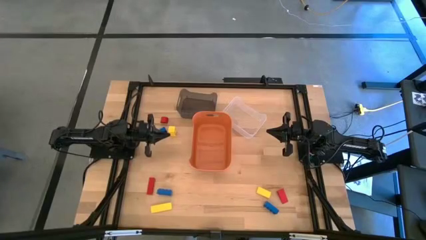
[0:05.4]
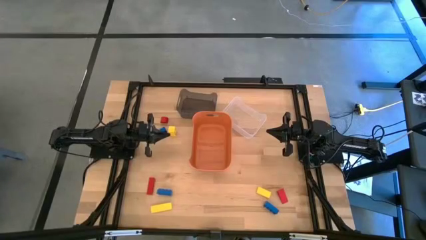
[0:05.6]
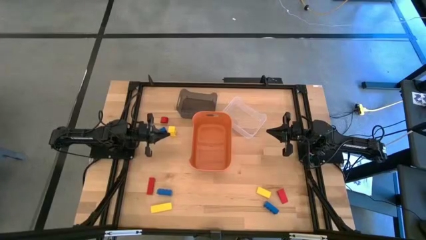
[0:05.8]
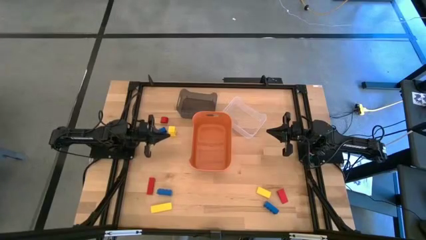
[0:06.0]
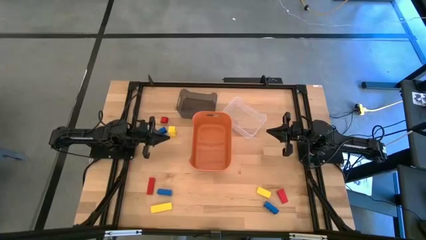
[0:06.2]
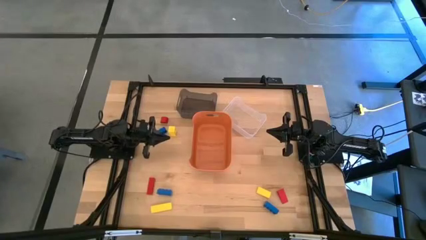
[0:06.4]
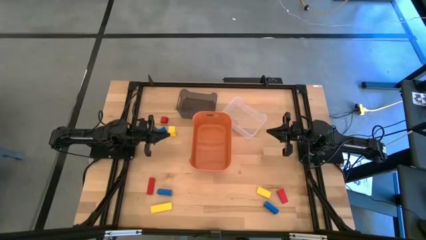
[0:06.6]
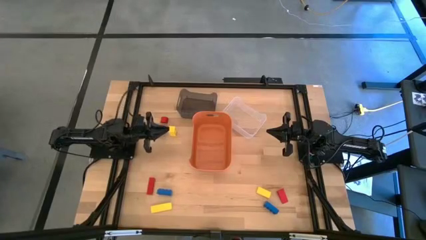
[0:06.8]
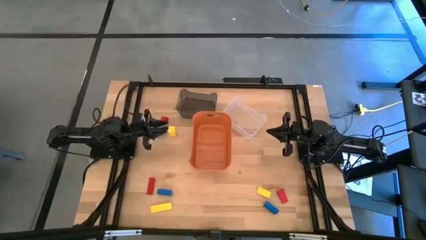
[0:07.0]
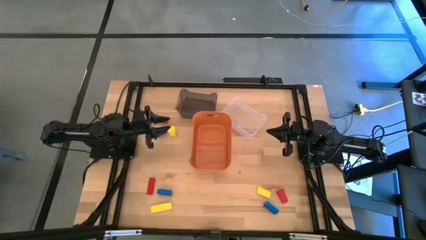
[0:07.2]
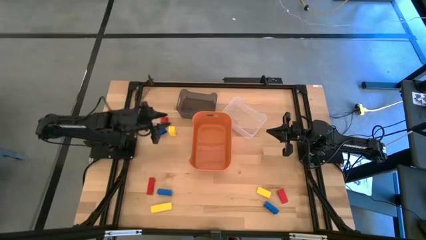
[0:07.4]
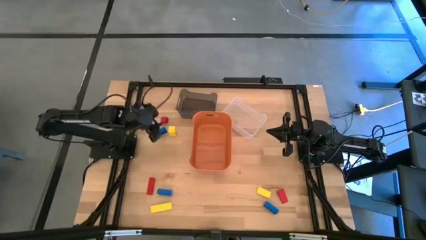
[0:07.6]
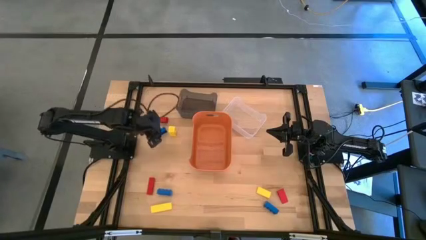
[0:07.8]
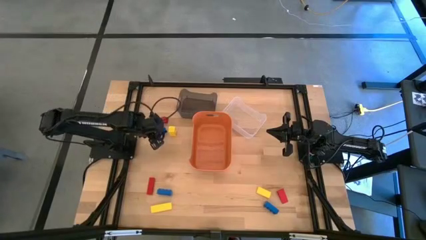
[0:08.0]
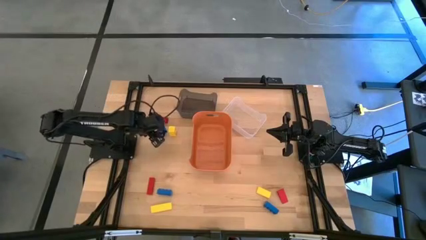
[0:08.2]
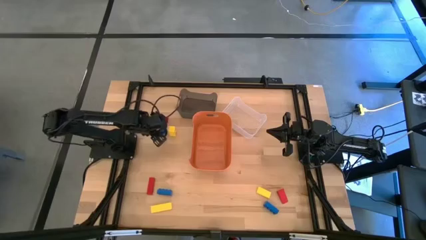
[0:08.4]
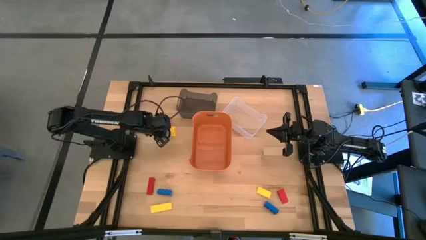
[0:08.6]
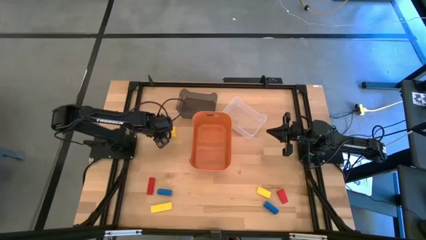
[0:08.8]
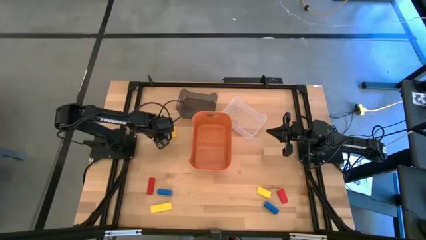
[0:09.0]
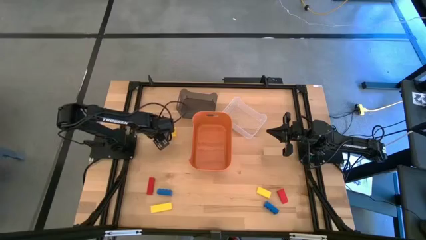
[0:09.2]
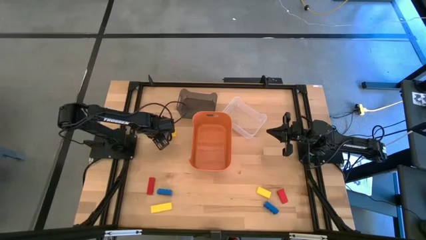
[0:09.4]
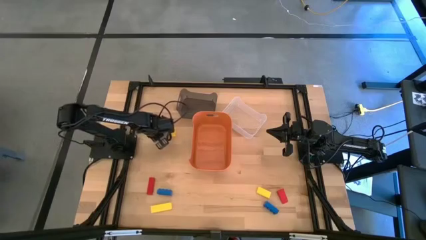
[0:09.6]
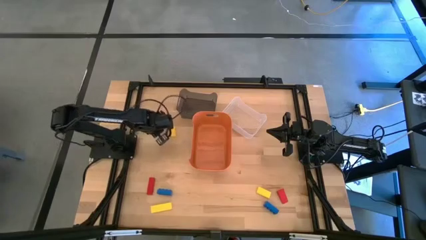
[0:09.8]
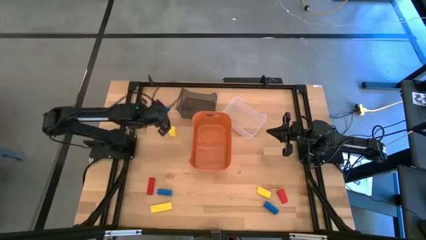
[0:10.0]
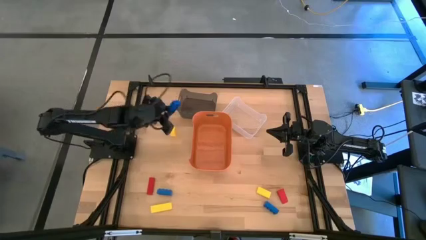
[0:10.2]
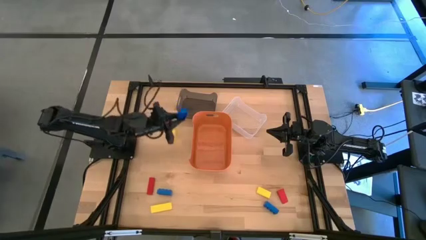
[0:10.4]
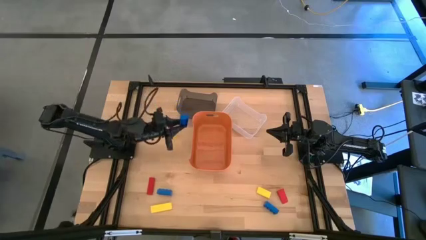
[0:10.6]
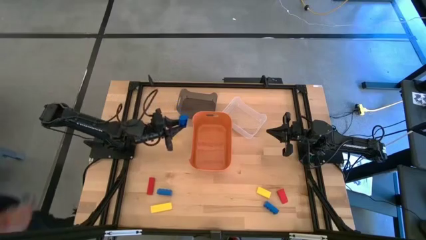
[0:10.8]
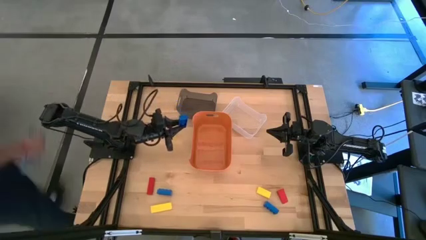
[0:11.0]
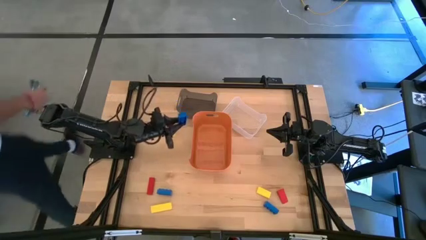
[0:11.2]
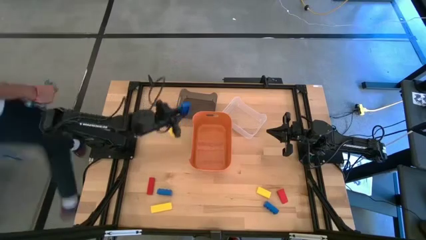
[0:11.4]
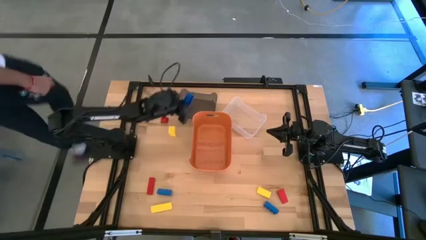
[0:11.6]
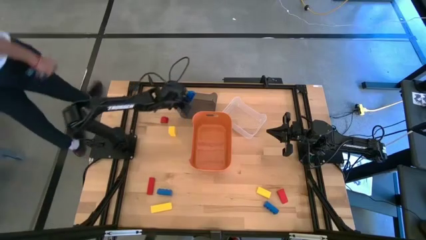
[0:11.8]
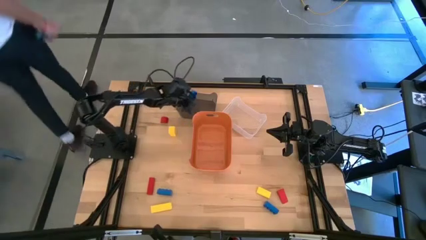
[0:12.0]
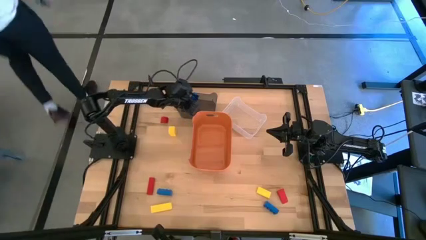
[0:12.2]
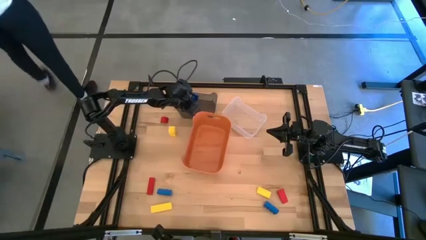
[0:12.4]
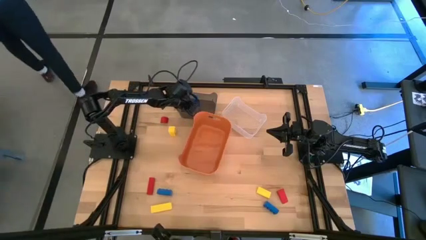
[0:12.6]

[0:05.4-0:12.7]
Task: Sort & place blocks by color
Put the top blue game piece into the black bin

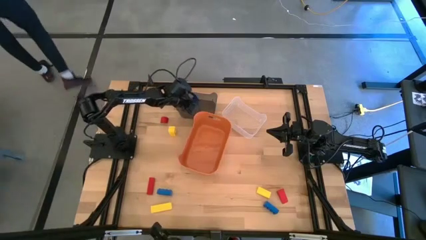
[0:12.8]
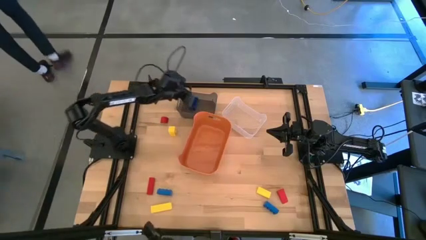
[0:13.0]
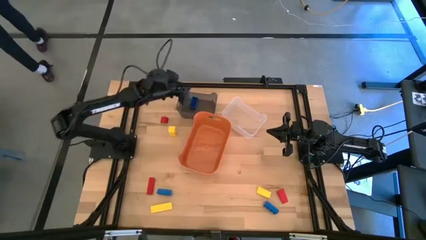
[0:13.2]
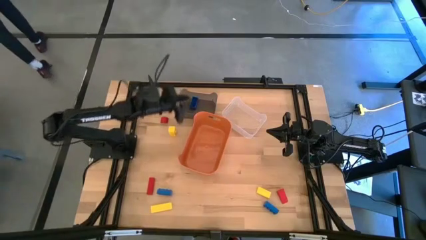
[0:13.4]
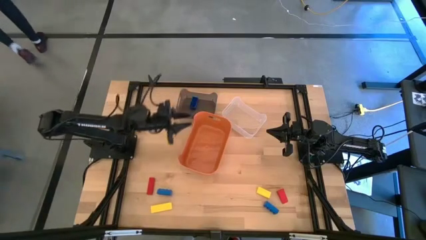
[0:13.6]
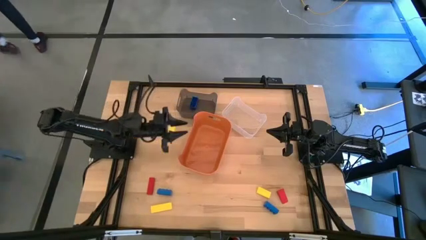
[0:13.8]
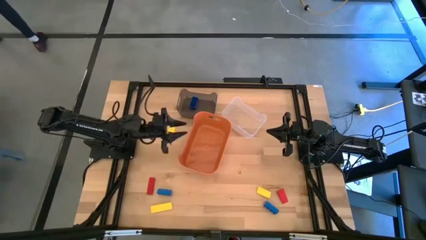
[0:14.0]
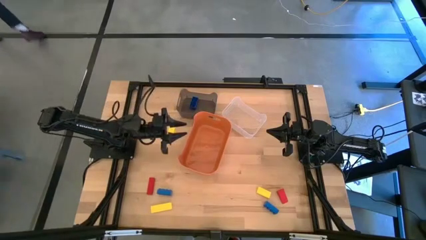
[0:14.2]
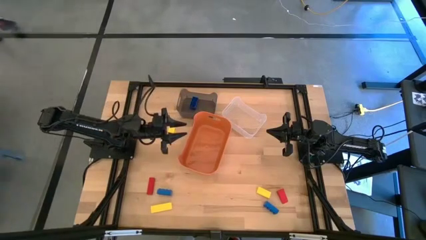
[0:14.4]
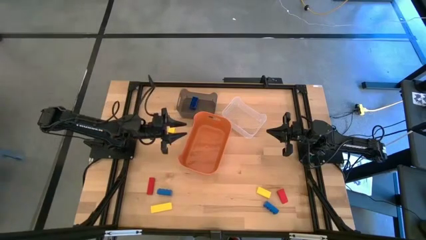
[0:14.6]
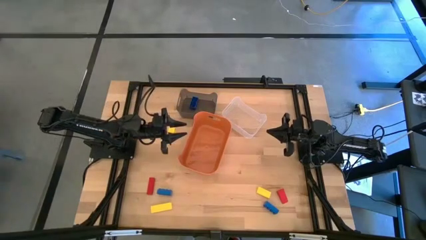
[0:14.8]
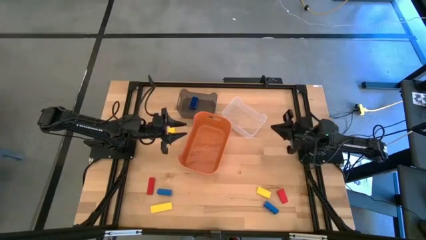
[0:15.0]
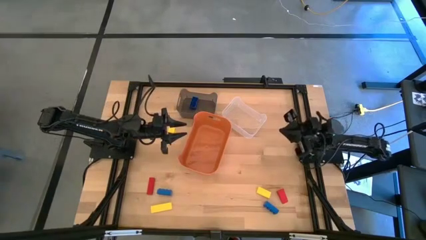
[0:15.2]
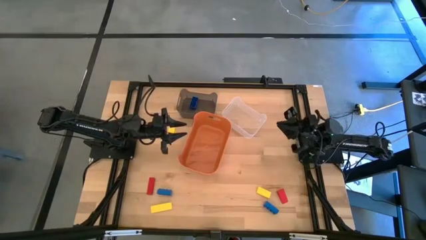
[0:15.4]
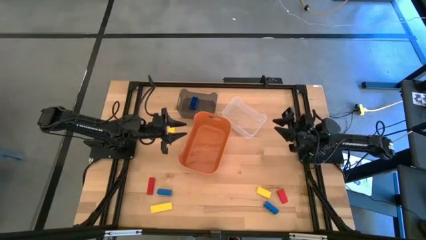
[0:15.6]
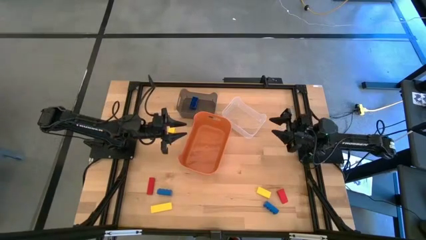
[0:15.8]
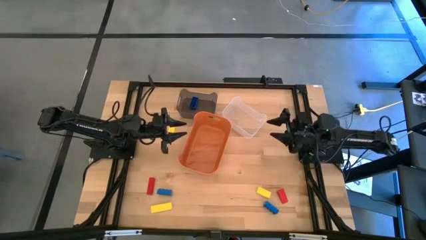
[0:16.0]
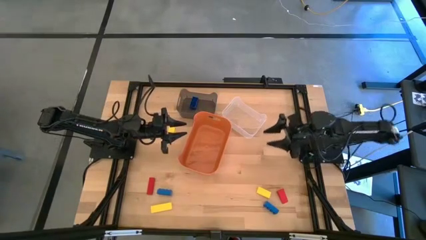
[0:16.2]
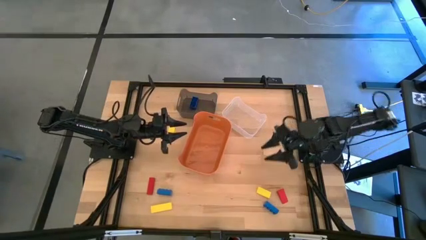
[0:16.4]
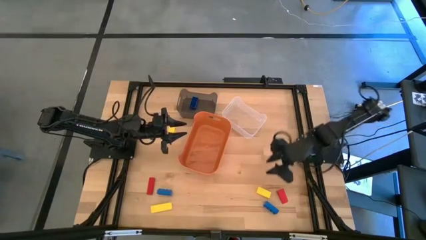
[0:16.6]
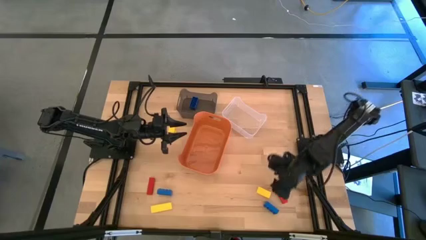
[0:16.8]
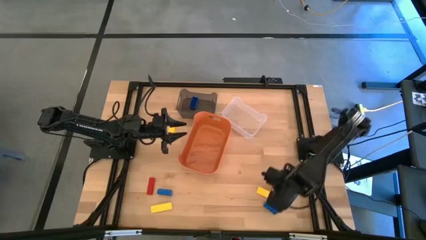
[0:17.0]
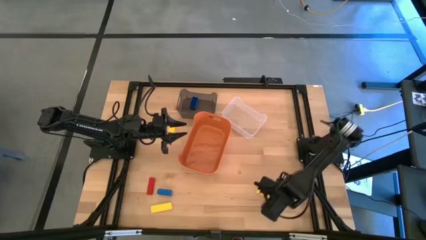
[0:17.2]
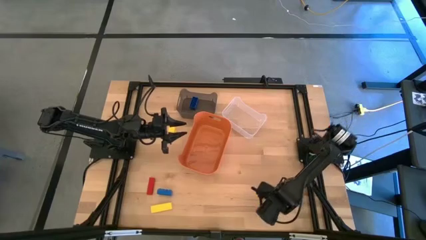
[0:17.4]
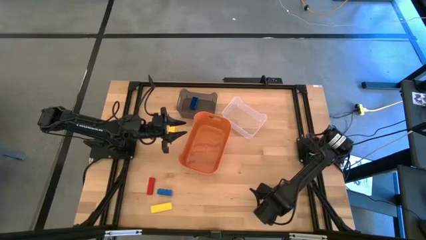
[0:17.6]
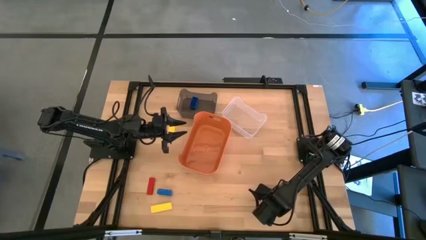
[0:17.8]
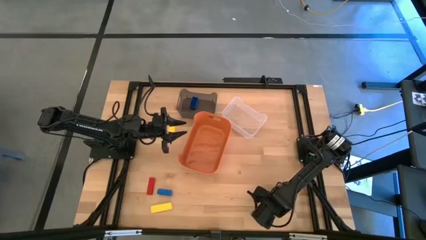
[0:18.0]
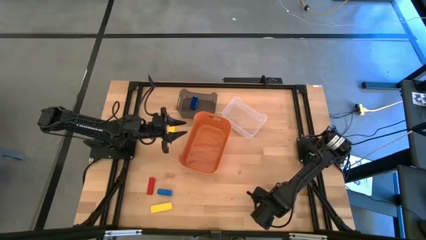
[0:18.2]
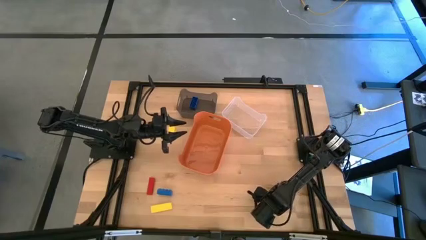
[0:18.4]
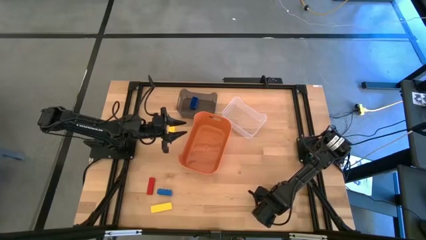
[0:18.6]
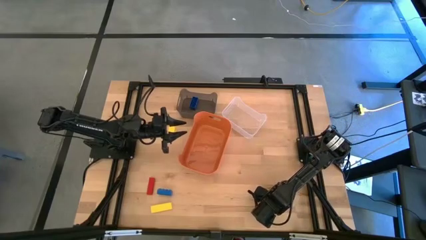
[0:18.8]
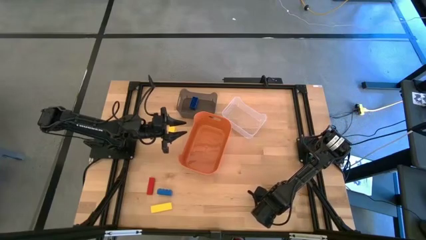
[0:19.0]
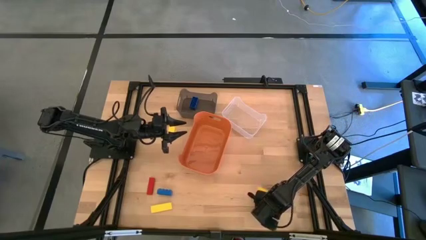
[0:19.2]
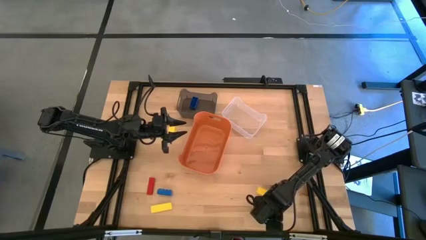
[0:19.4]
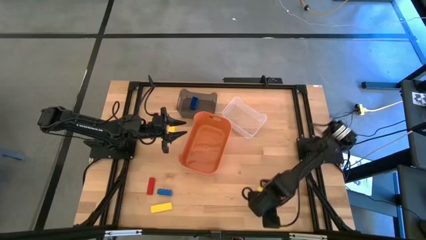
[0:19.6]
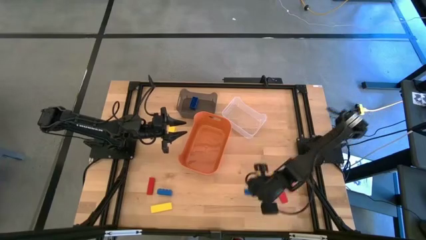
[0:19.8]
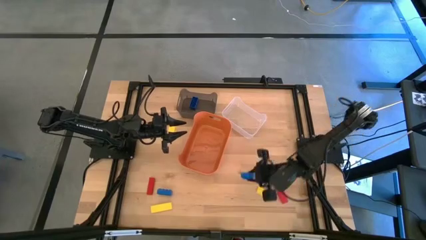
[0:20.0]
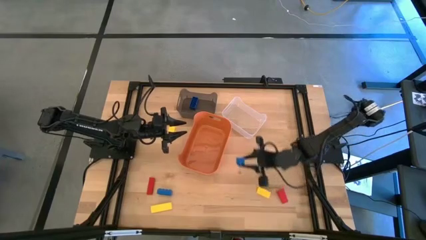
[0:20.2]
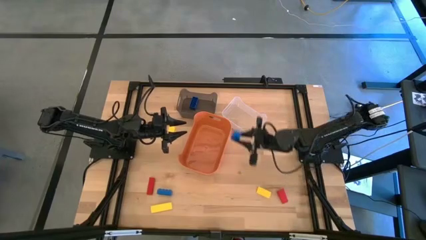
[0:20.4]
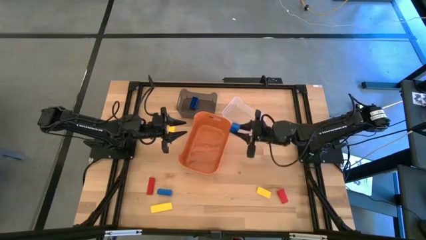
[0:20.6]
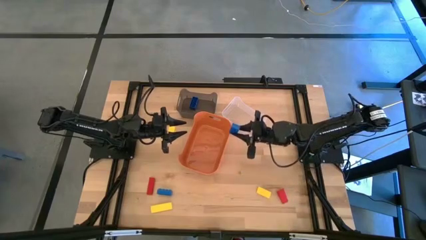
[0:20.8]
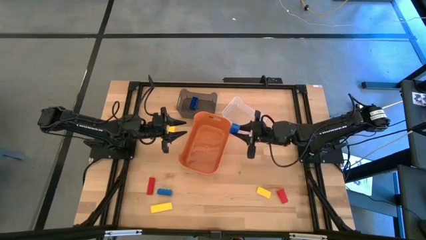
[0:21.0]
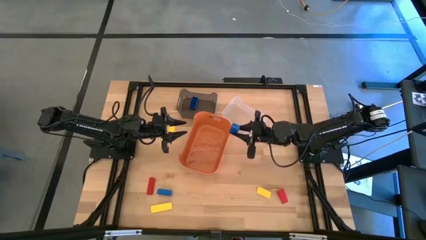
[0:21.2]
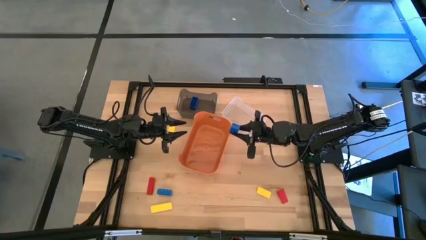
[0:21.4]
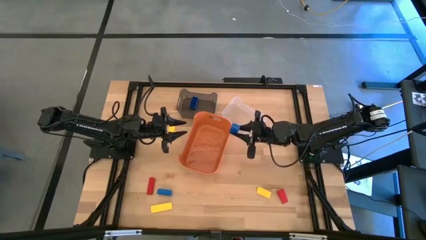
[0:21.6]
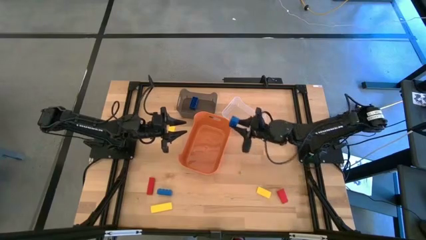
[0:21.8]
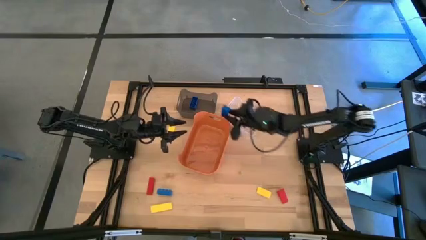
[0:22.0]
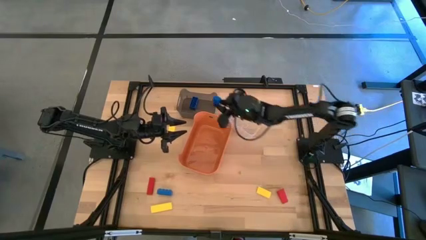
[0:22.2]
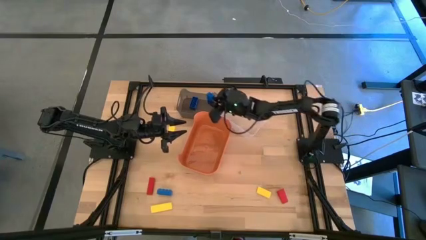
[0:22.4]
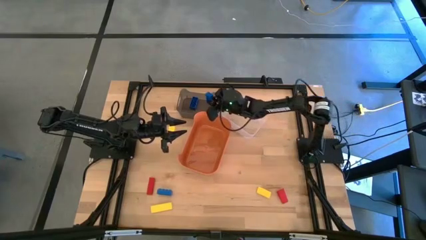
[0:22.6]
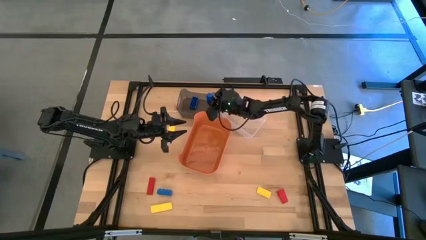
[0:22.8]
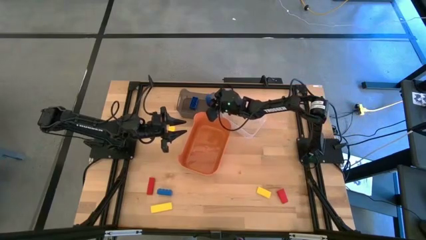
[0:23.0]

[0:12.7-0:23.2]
Put the right blue game piece into the black bin
